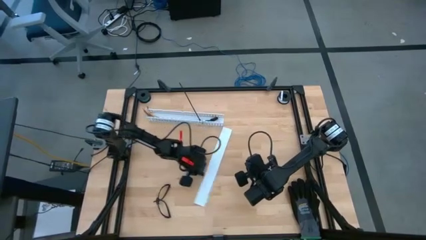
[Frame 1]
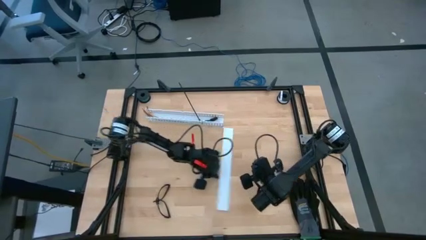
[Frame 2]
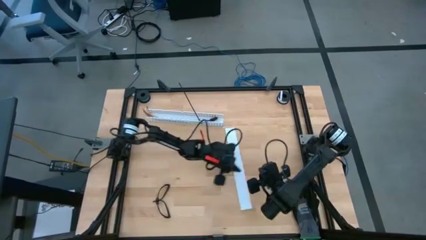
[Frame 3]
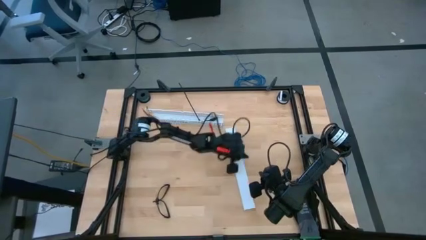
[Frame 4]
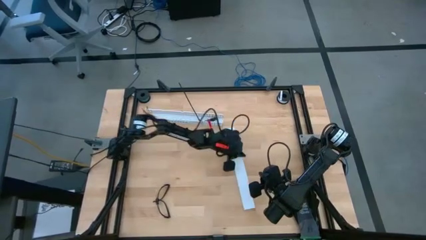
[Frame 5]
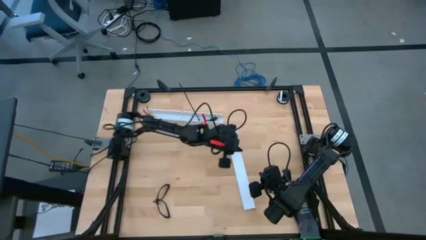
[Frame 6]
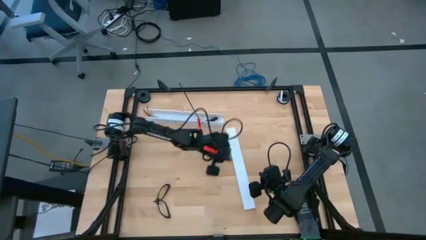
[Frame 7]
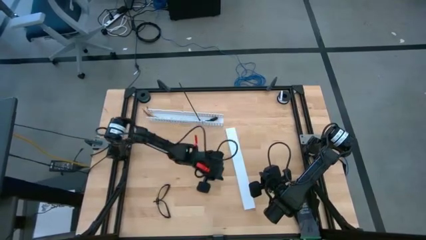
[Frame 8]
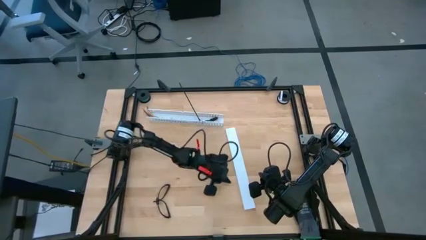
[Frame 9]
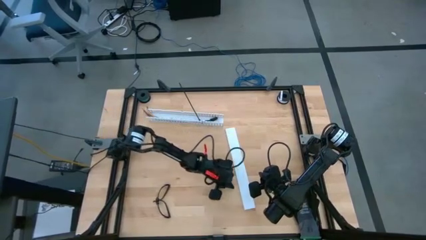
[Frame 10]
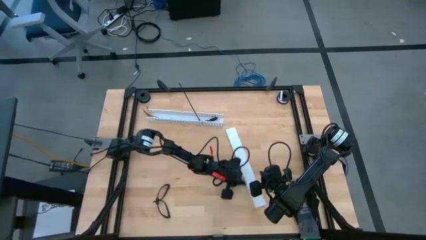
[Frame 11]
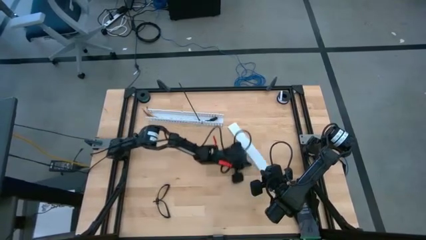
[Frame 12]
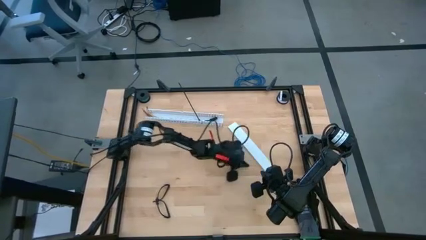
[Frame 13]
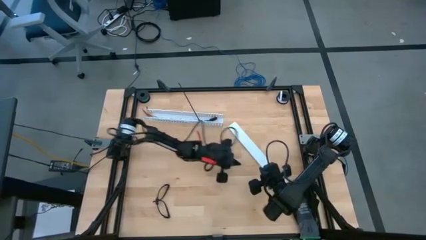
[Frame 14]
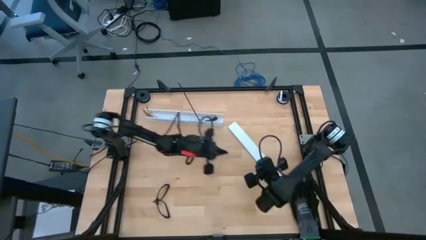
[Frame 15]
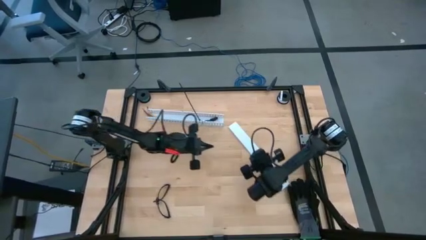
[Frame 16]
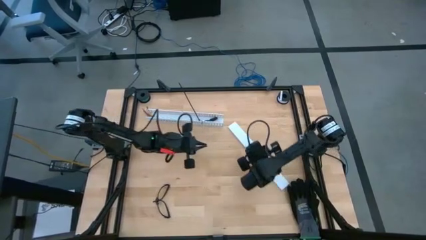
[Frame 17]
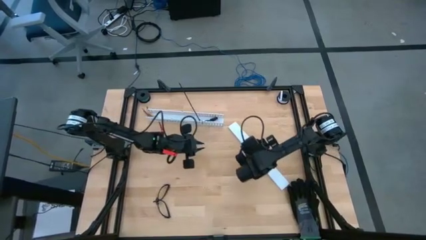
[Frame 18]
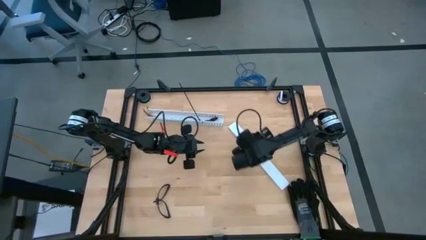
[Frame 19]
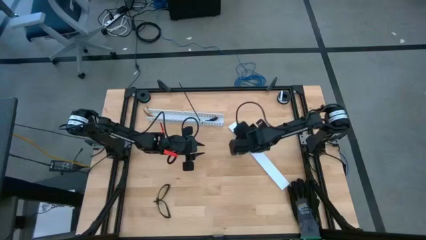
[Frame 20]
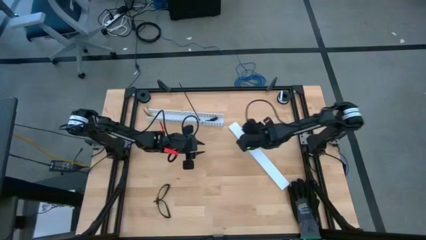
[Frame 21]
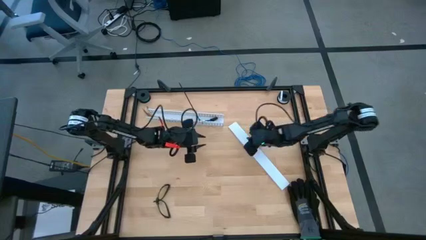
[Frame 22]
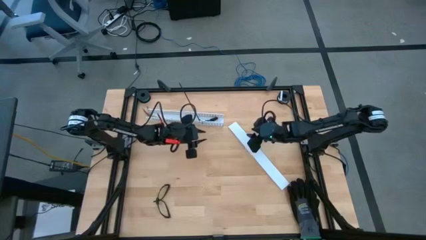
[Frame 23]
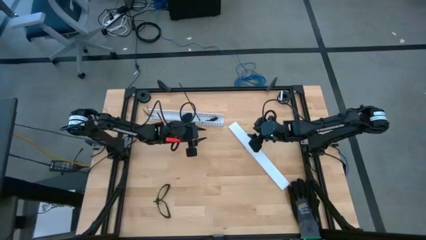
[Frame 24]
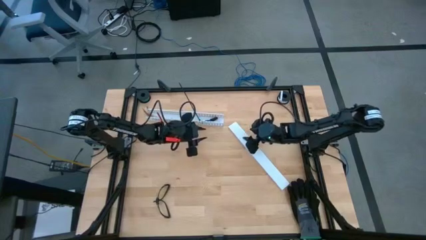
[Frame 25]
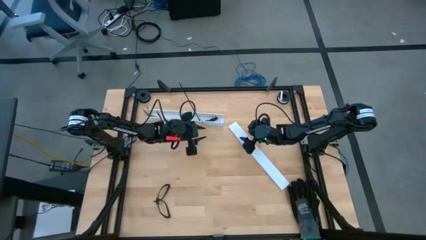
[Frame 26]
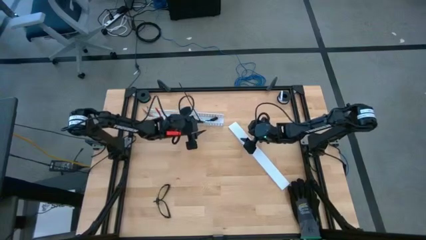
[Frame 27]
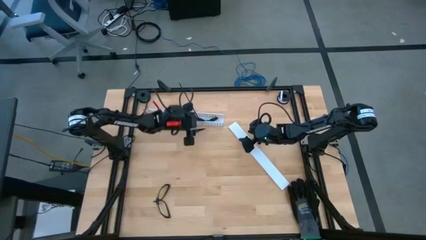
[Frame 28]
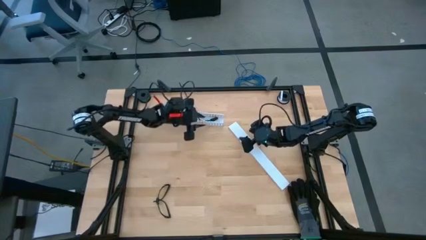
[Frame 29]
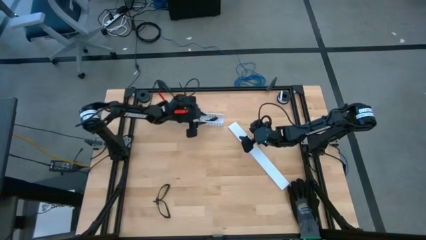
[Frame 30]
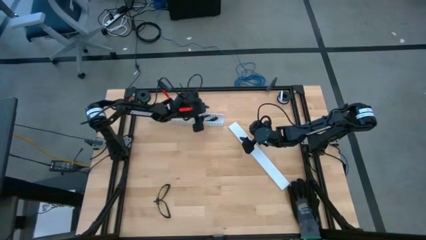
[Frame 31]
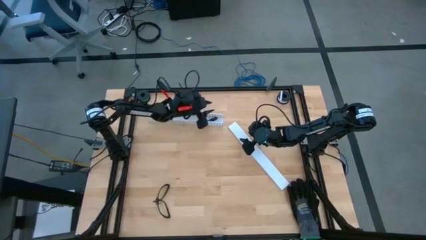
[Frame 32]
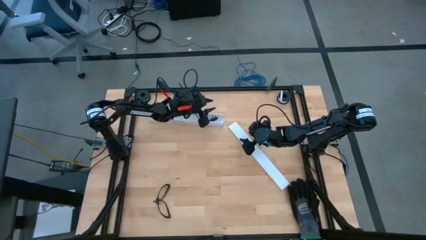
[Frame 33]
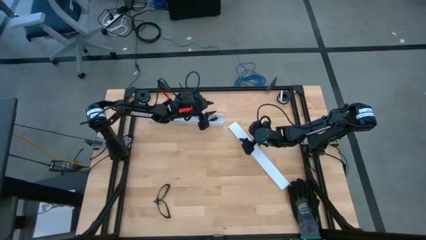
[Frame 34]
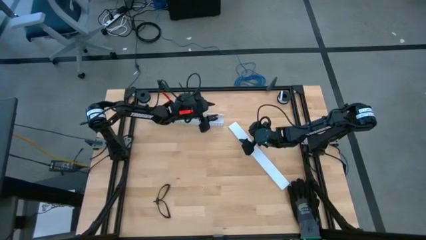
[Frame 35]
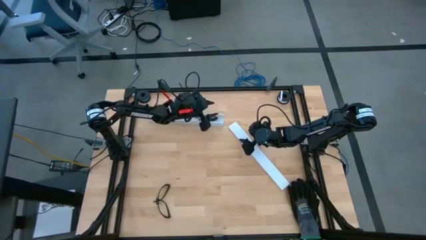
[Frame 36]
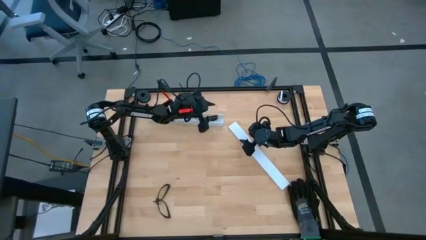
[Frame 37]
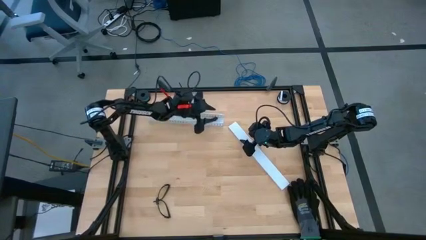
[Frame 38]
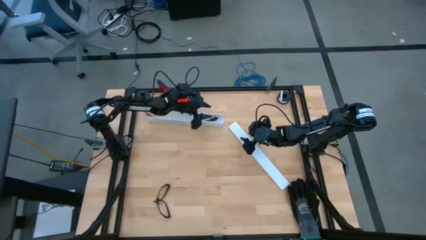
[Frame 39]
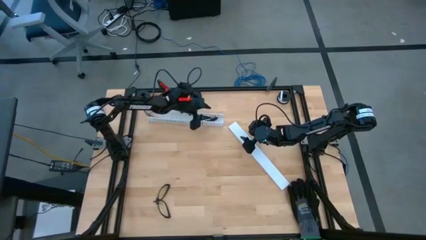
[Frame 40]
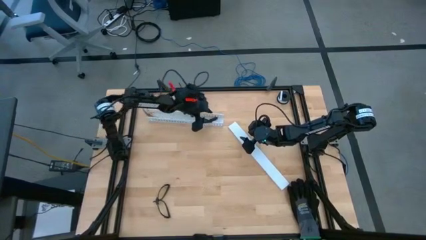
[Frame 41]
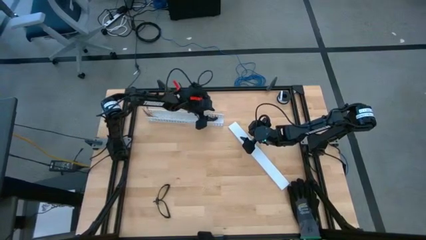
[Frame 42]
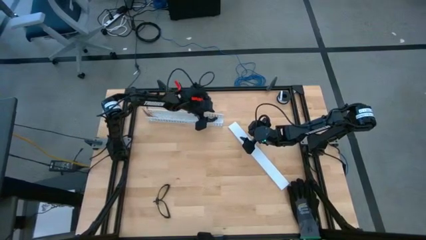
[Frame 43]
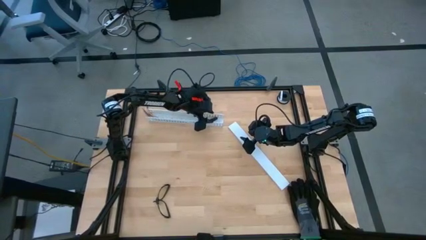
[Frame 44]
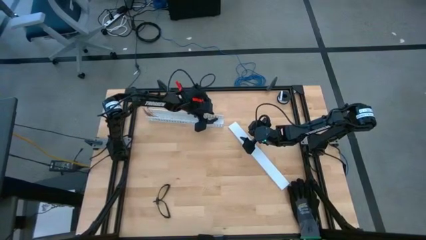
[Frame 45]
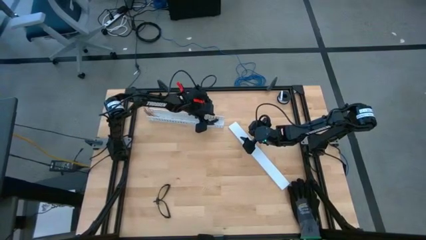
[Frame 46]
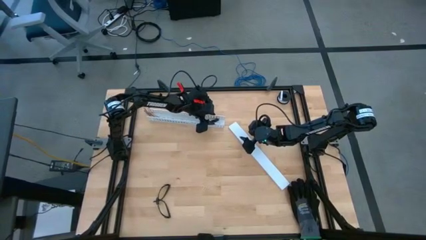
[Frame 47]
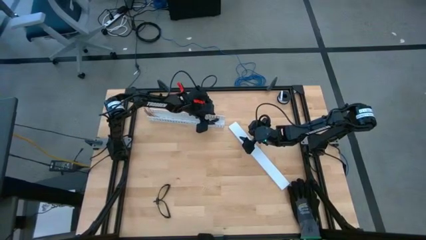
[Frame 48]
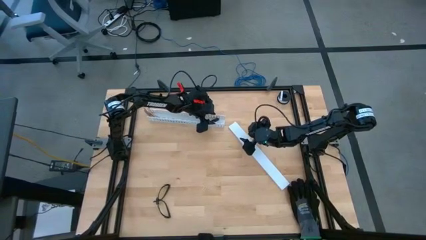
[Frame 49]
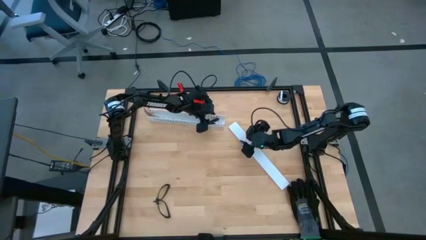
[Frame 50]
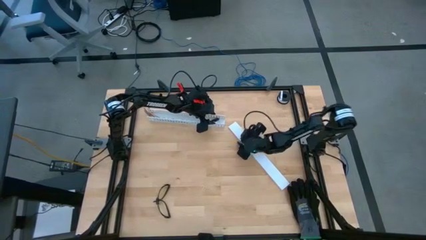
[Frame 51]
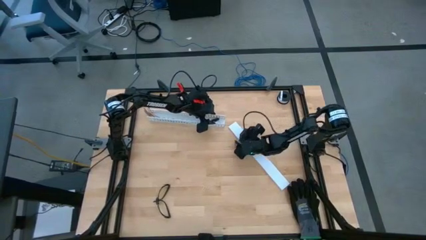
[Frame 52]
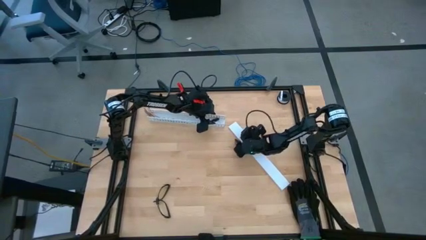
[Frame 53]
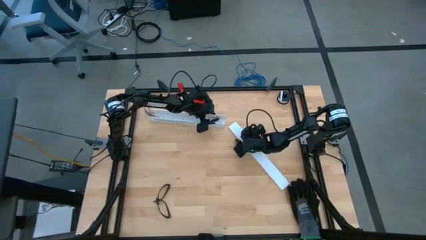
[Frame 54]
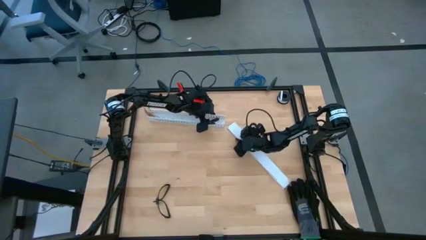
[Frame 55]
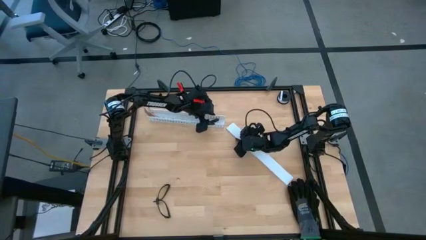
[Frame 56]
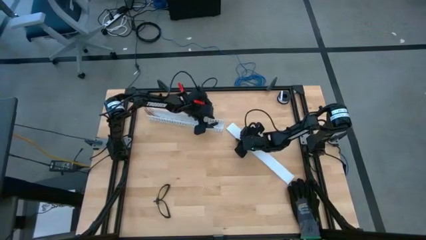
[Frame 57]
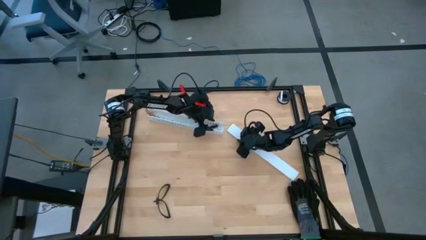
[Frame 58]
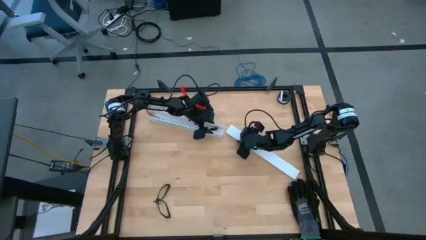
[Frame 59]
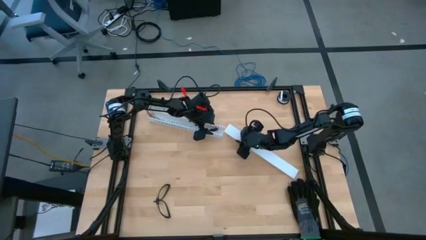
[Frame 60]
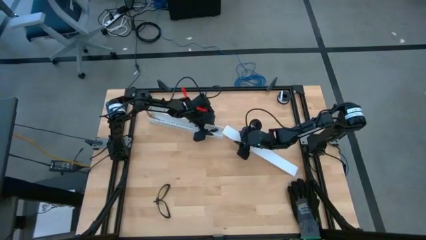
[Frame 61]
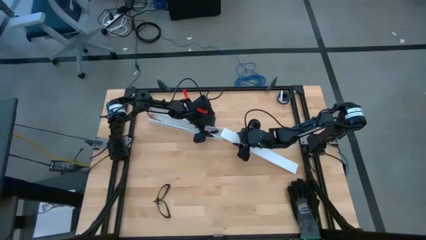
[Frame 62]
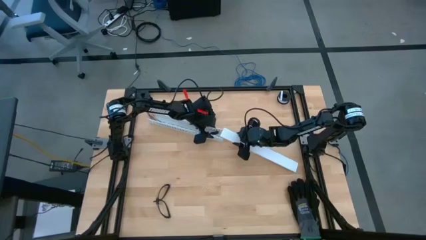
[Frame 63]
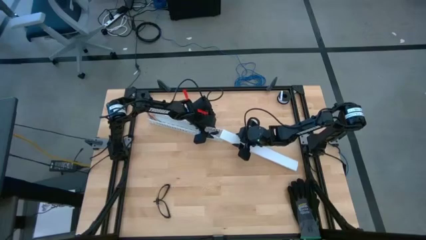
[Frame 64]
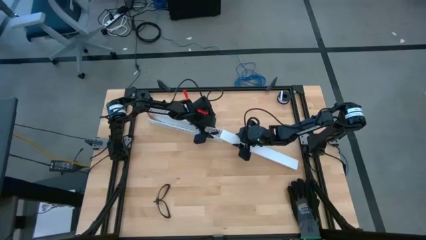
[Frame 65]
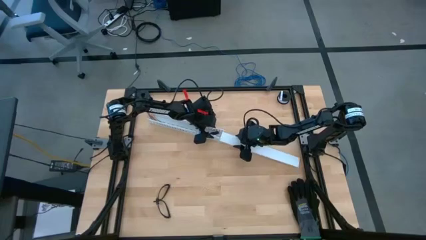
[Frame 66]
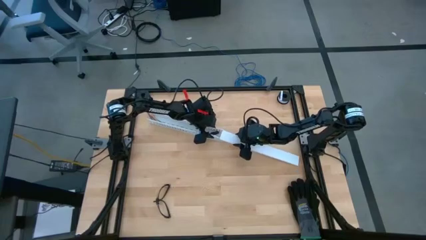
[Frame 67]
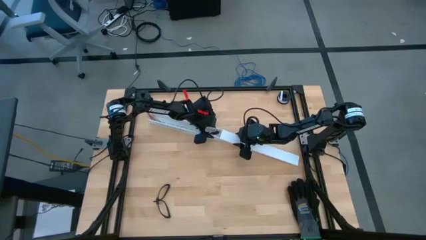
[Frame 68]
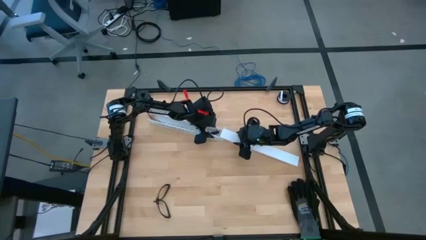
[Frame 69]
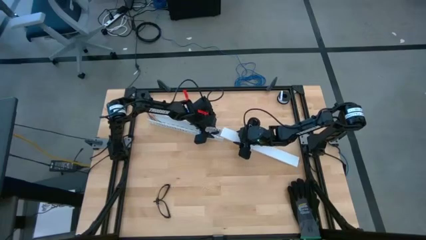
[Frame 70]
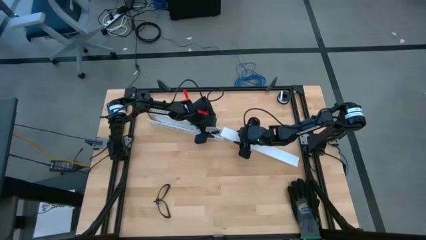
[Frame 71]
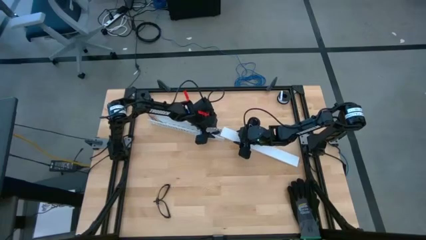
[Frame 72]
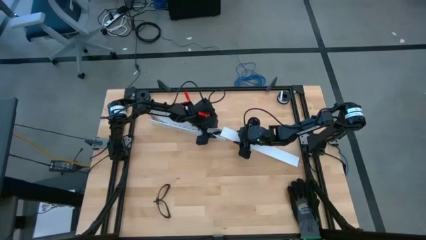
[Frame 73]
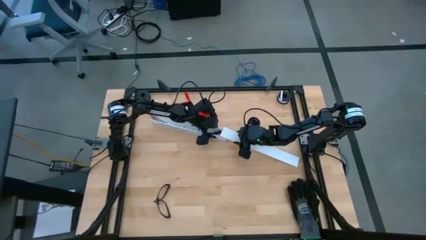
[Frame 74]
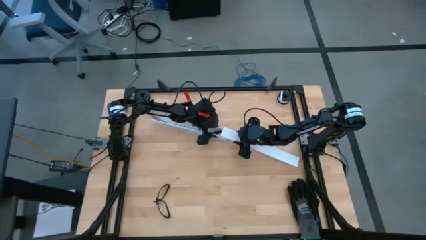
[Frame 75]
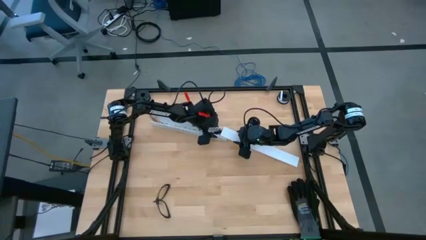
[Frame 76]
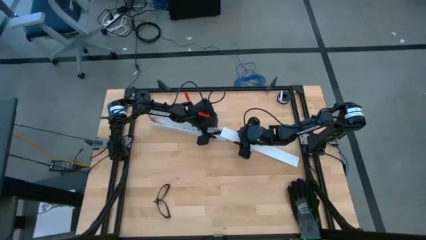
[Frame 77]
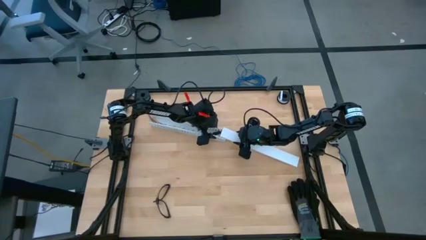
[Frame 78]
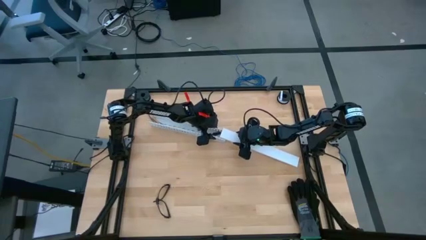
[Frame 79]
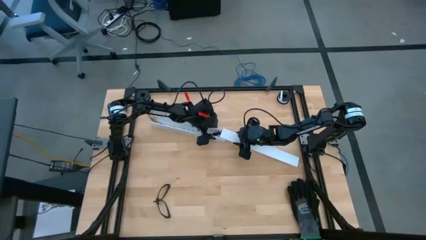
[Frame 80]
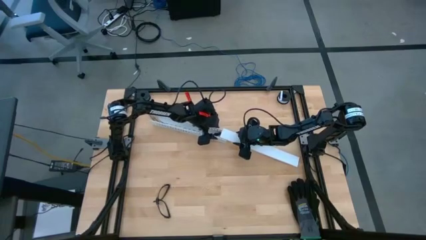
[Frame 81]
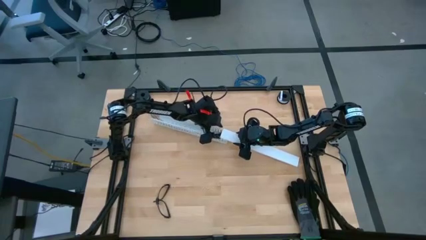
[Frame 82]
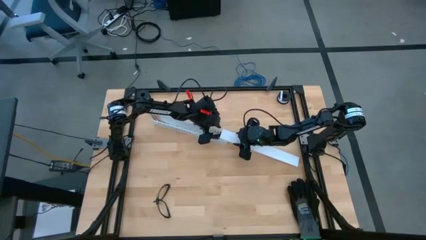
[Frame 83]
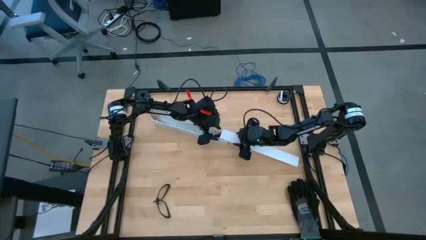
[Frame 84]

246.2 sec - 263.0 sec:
Task: Ziptie cables
Close the white cable duct lid
